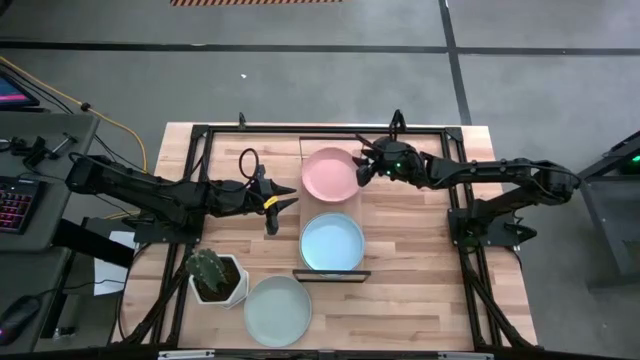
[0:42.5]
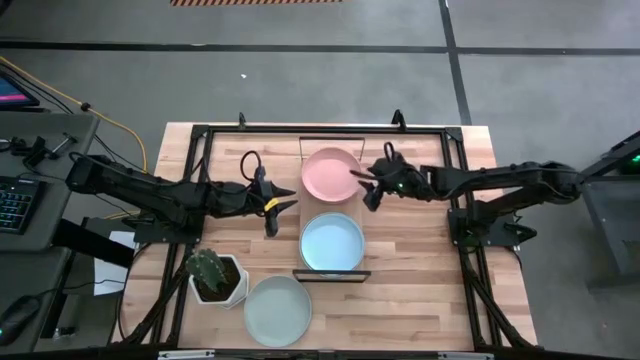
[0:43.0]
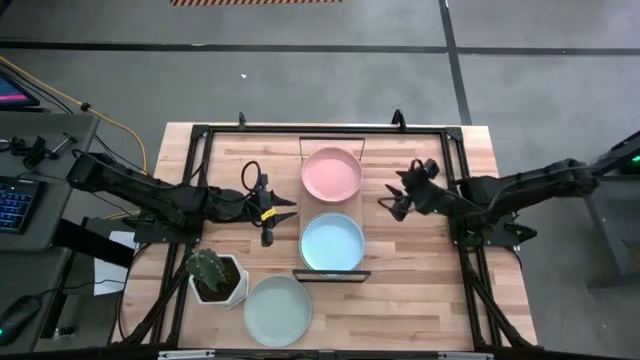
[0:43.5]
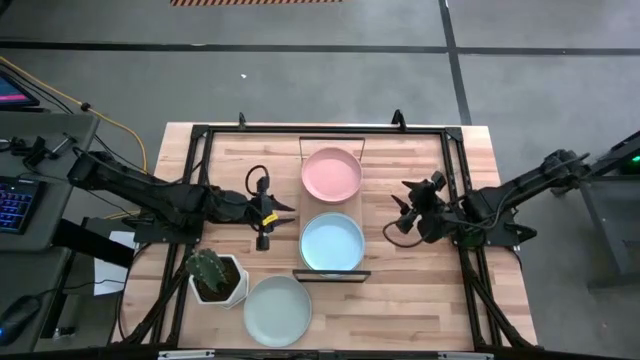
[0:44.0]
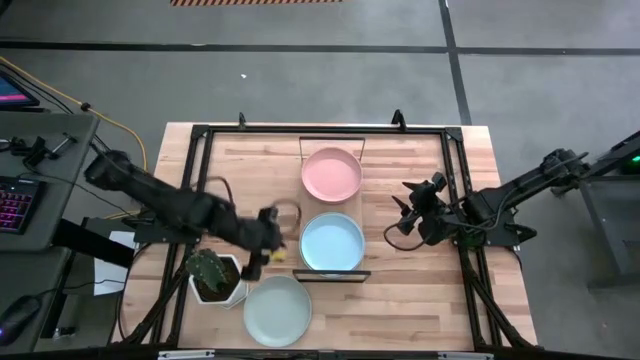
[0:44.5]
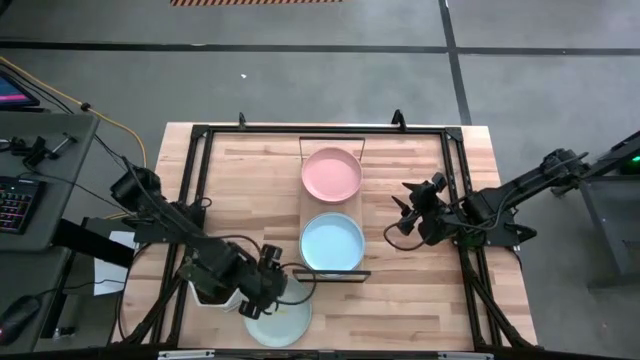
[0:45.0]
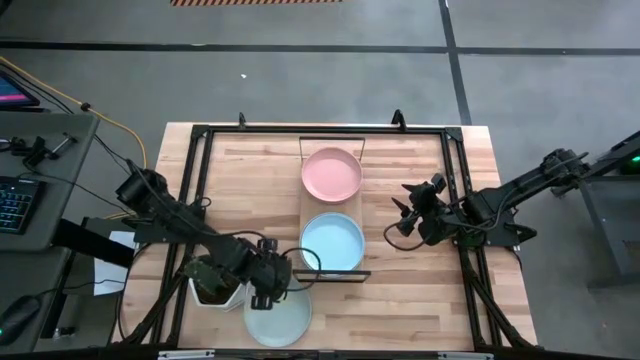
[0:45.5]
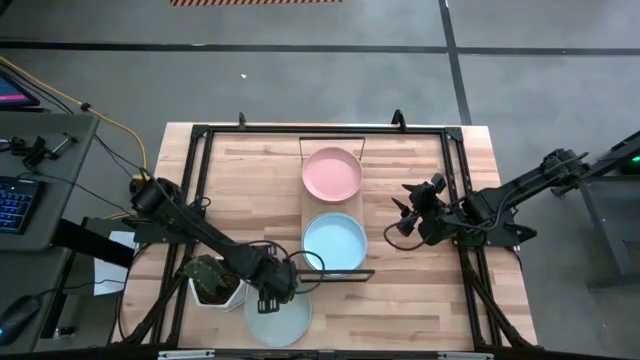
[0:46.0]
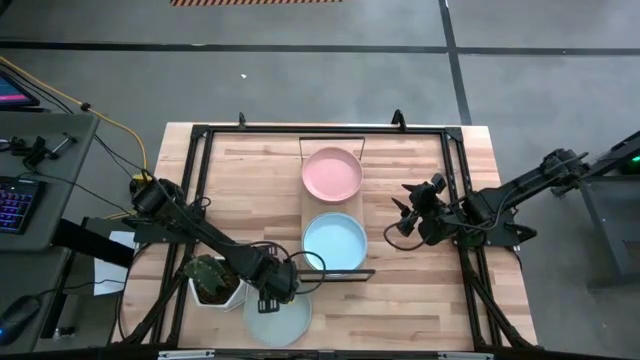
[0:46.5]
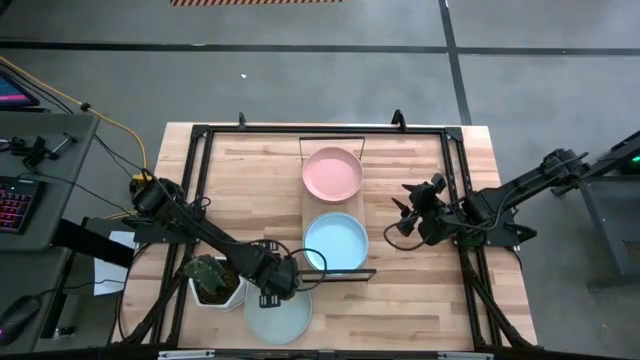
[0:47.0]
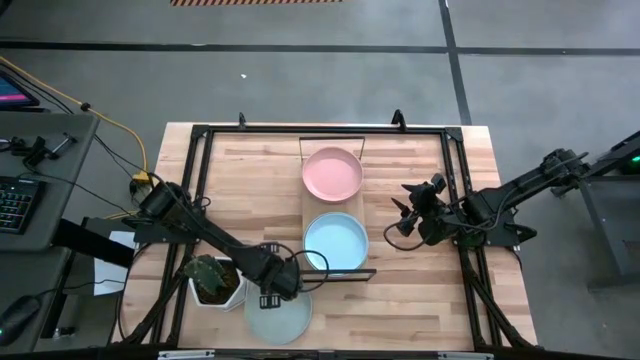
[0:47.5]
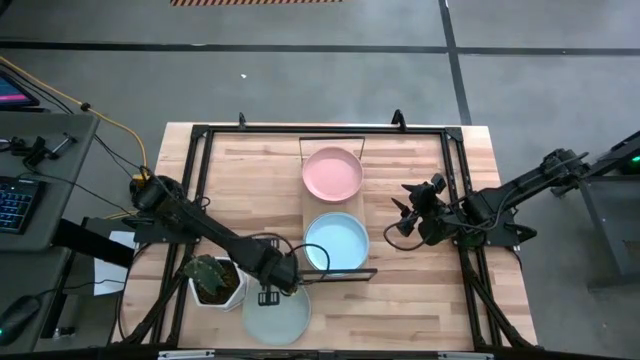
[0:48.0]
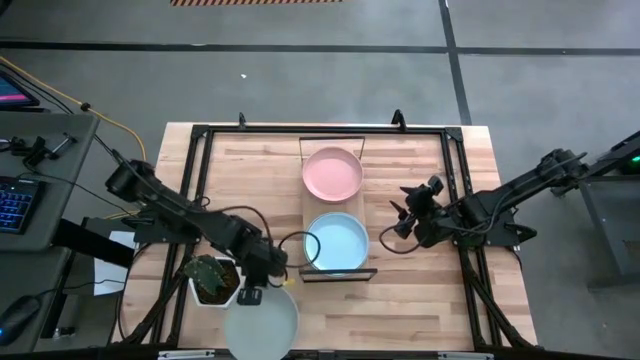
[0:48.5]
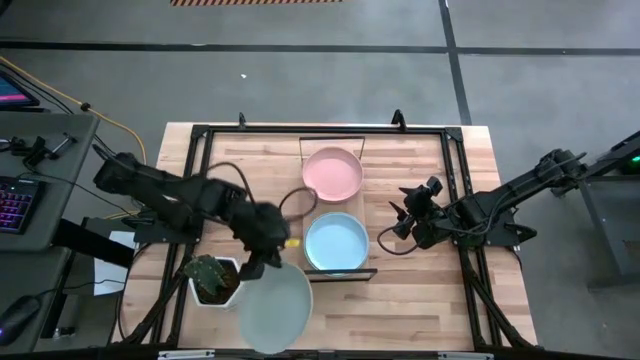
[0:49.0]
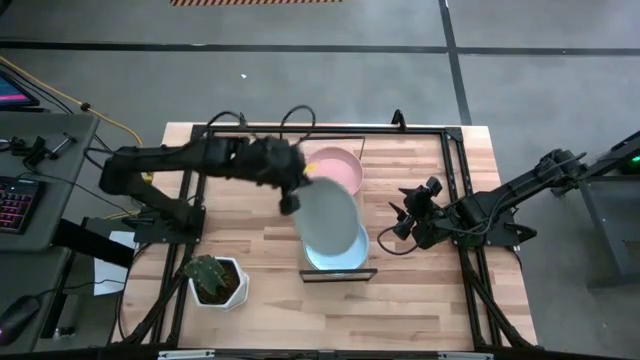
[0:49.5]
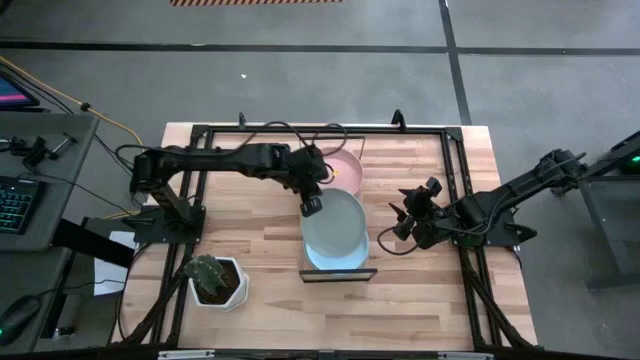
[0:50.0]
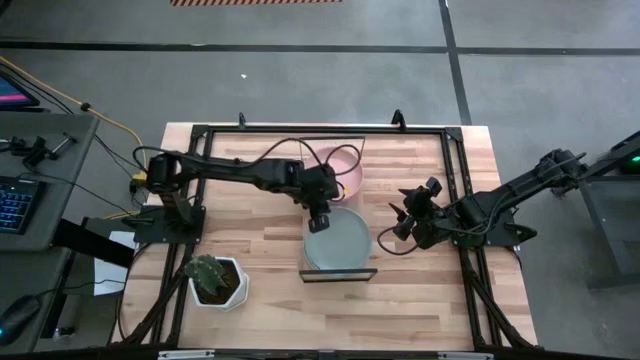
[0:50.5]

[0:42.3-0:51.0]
Task: Place and stack plates onto a shelf
Stack the gray plate on top of the blue on the shelf

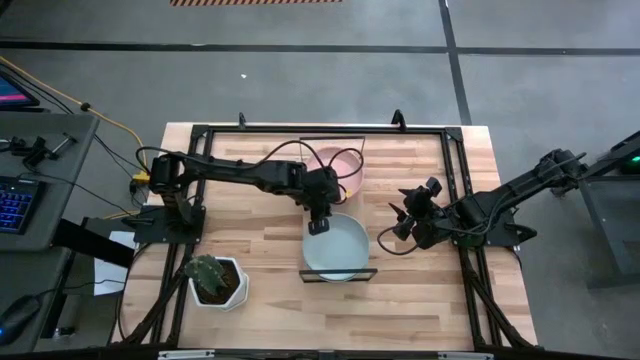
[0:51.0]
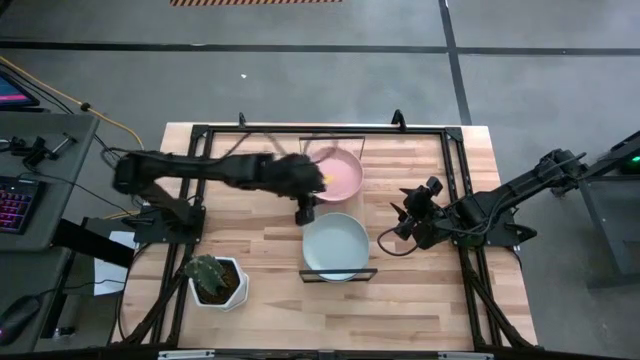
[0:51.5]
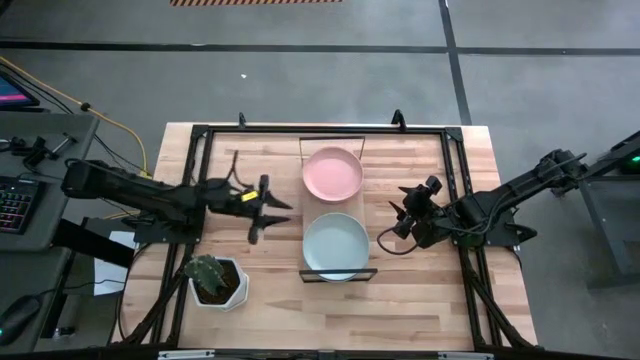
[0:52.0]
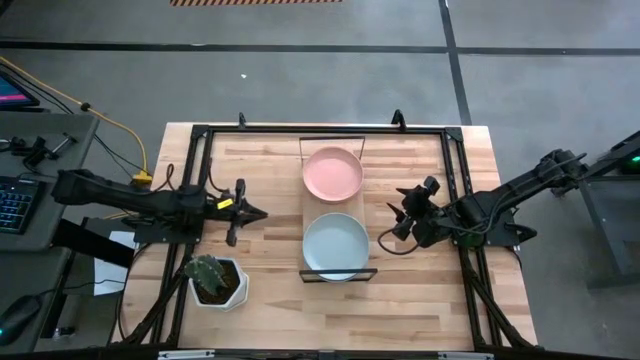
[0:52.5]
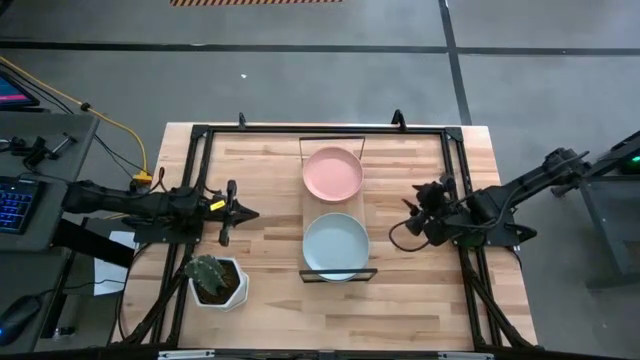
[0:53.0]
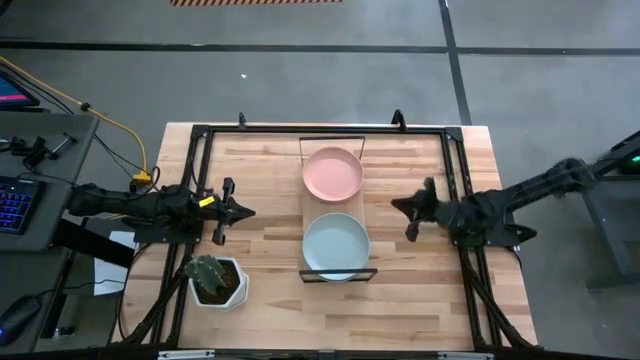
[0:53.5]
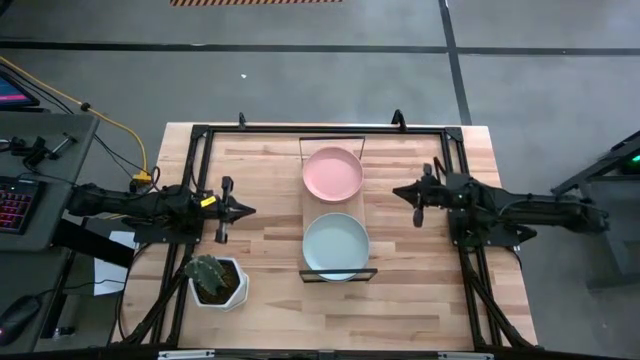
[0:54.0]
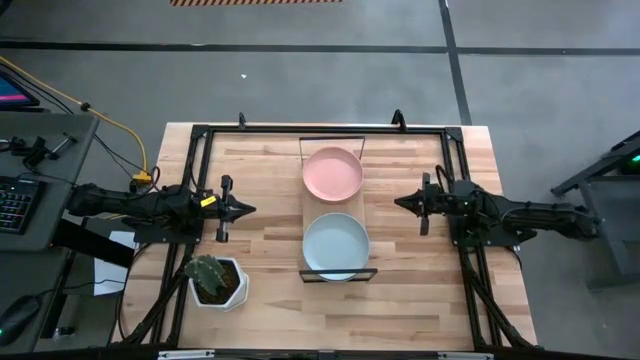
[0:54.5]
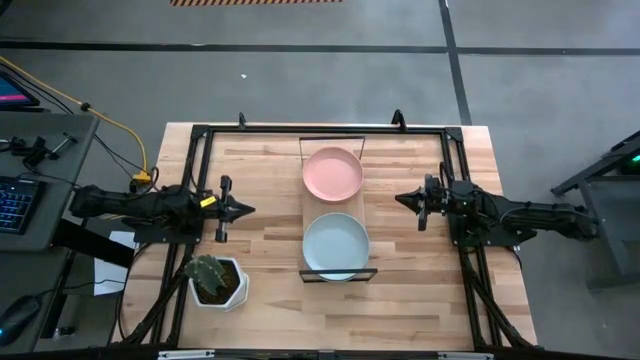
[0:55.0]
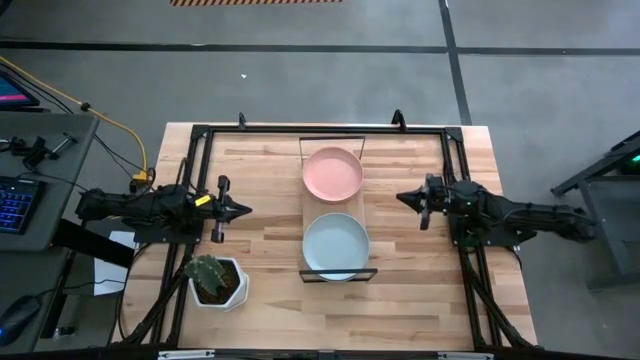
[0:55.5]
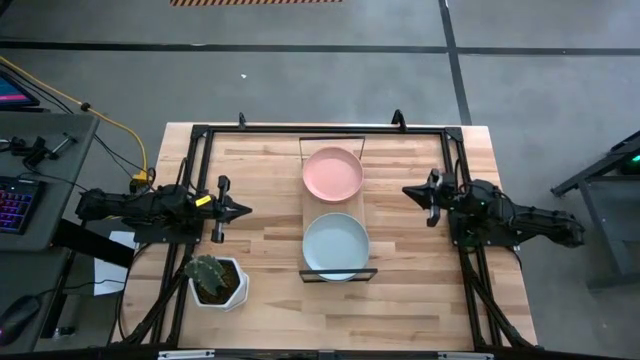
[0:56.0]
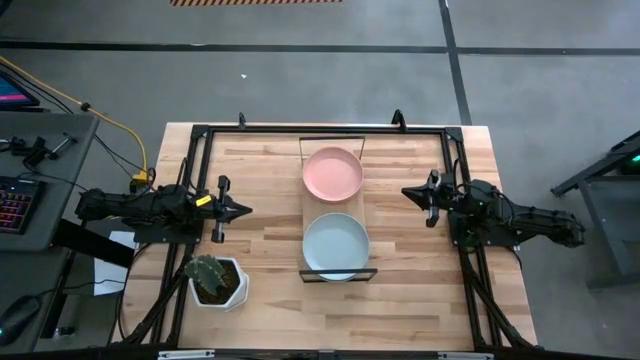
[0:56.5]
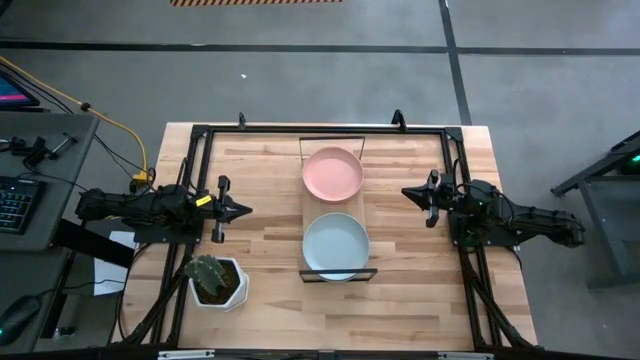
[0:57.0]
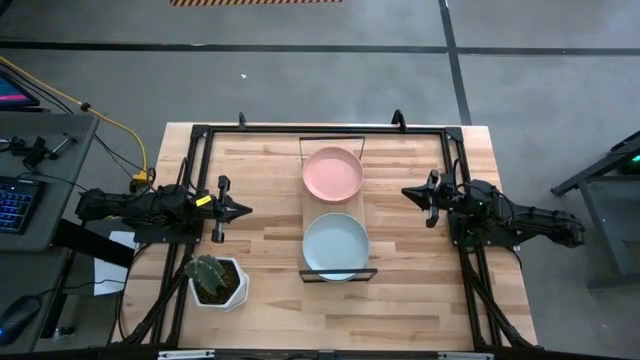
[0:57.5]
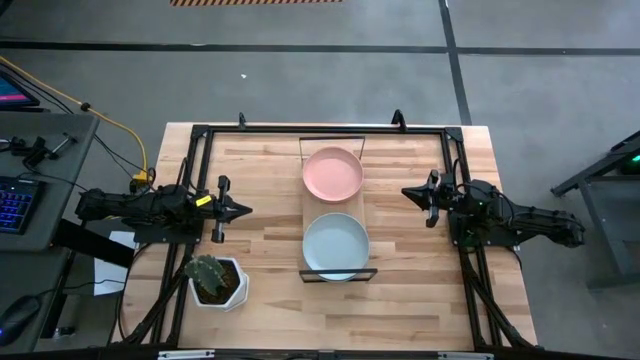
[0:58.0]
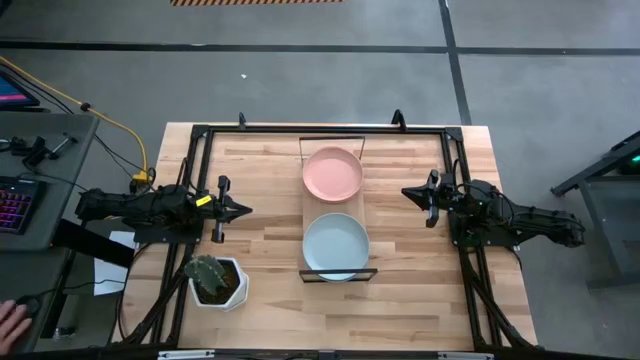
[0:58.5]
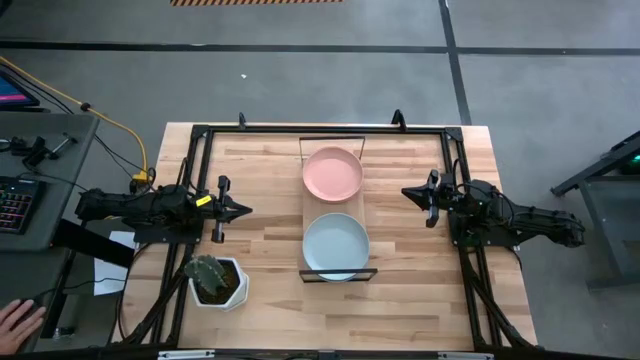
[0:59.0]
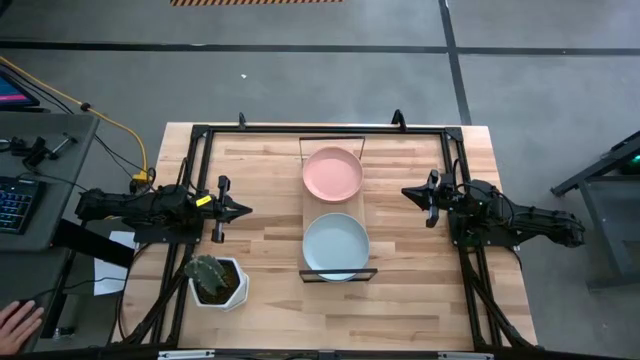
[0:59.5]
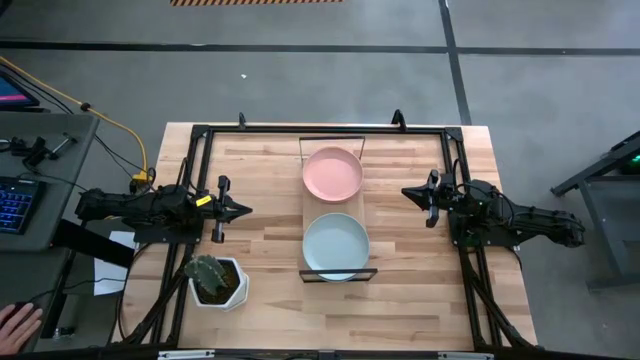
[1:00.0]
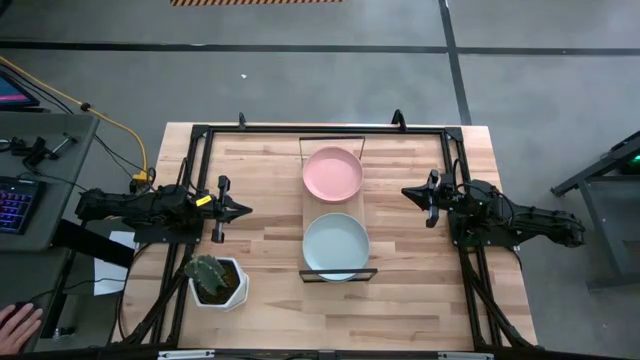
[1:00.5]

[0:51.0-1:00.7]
Return to Home Position
